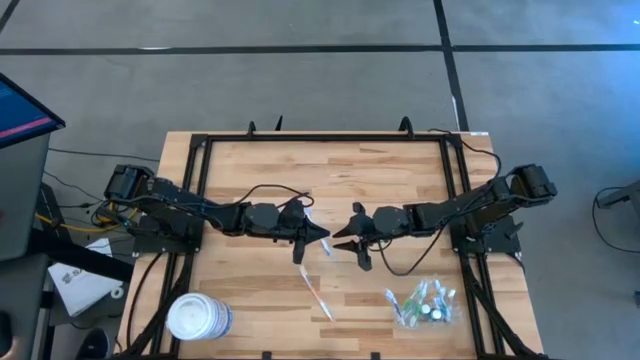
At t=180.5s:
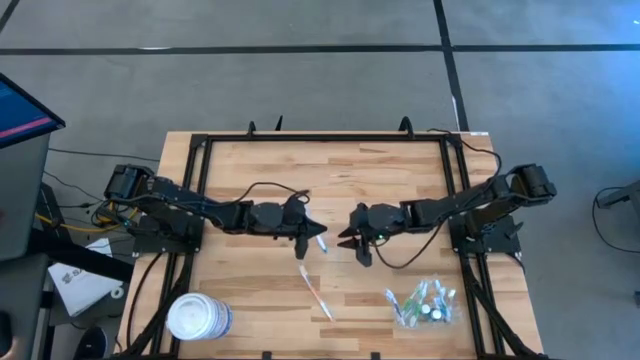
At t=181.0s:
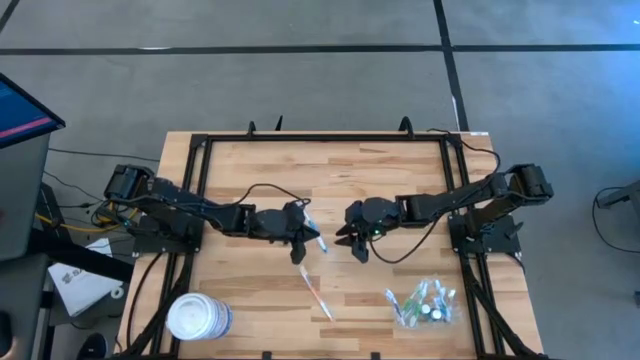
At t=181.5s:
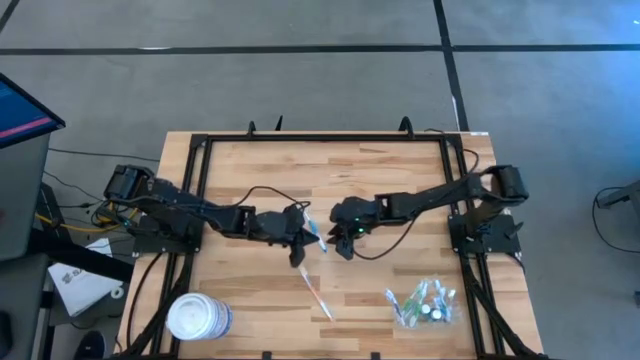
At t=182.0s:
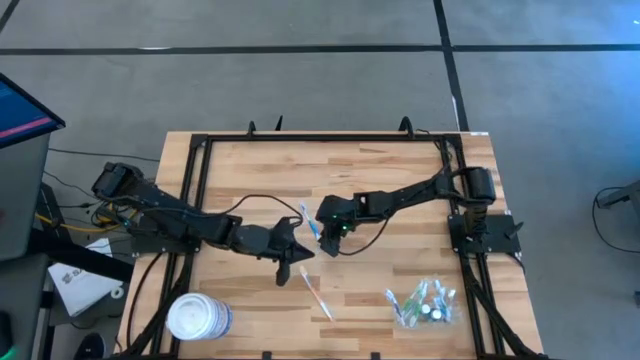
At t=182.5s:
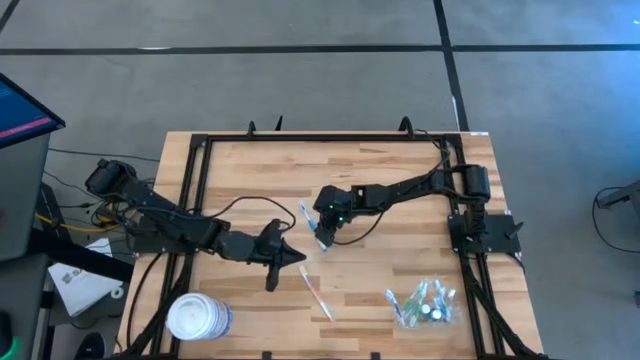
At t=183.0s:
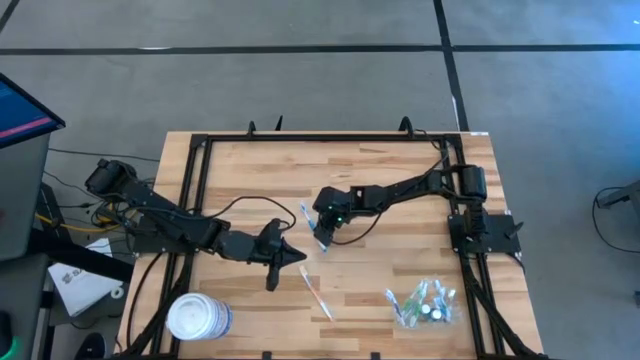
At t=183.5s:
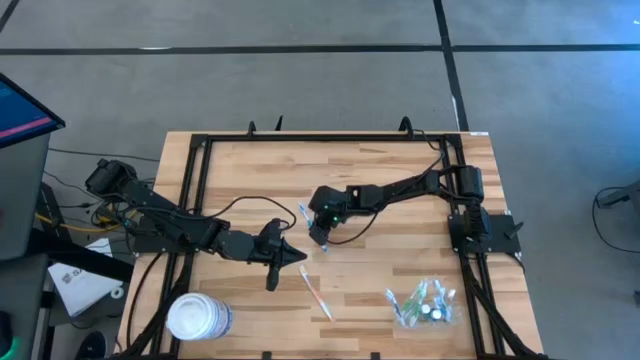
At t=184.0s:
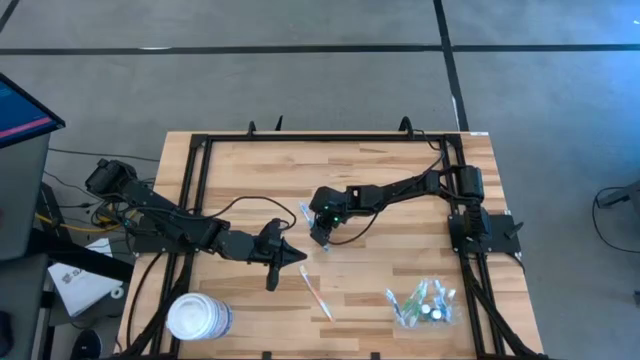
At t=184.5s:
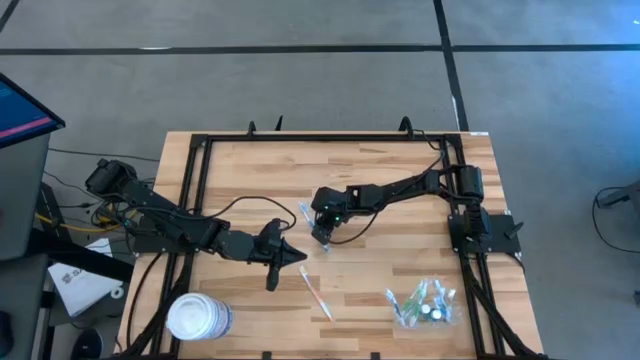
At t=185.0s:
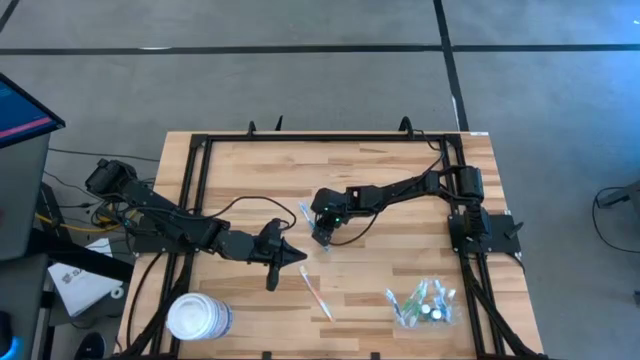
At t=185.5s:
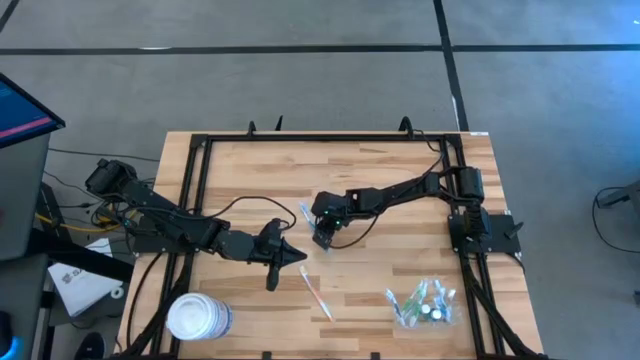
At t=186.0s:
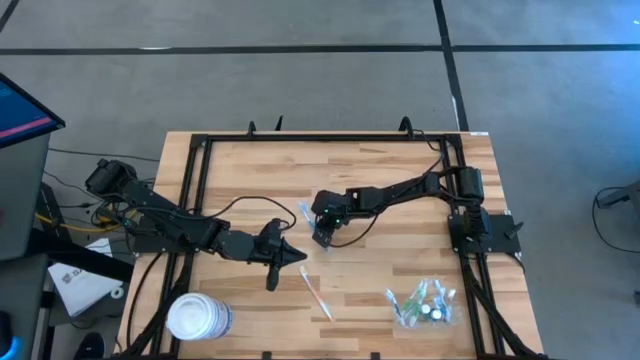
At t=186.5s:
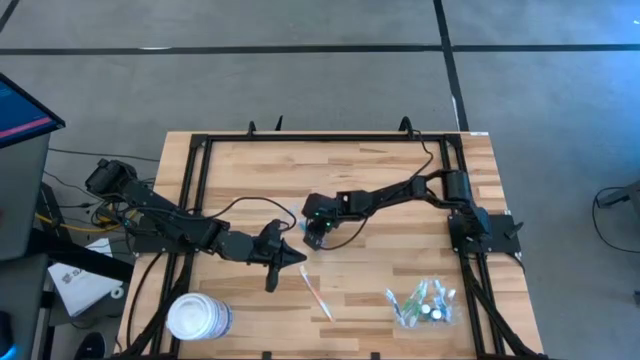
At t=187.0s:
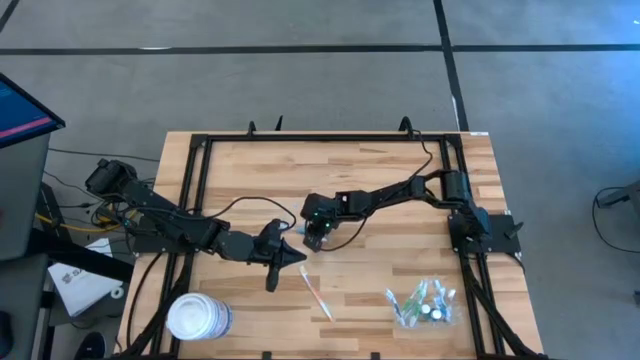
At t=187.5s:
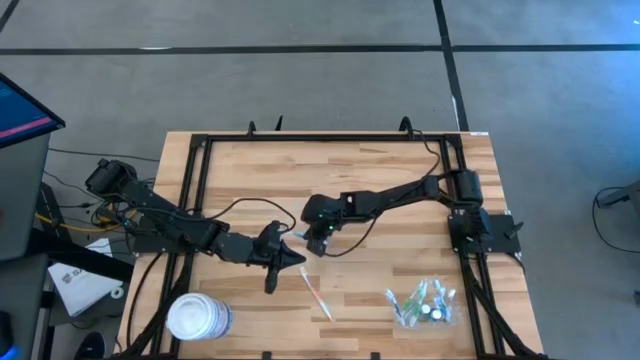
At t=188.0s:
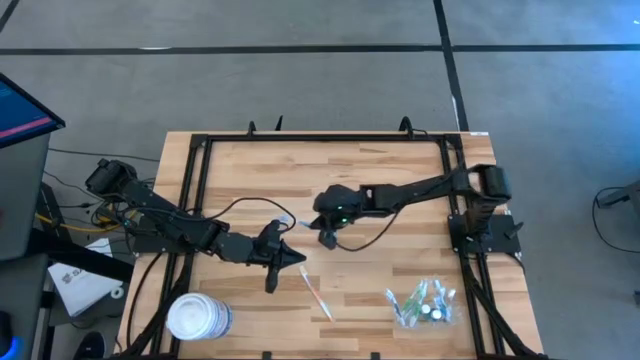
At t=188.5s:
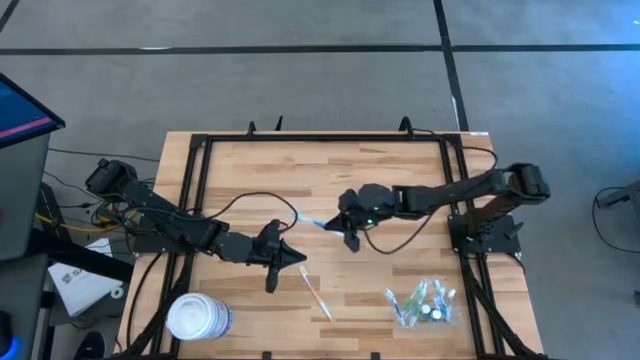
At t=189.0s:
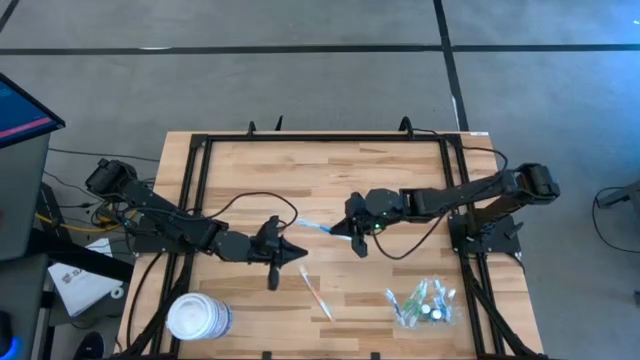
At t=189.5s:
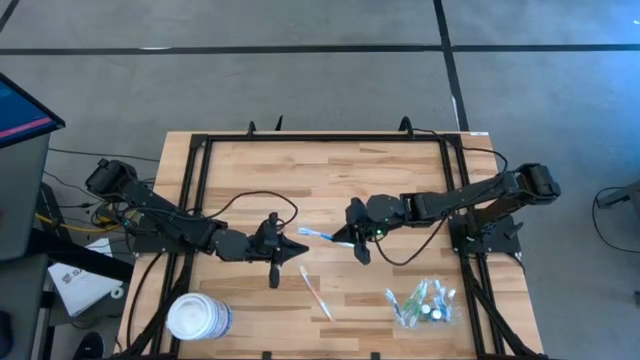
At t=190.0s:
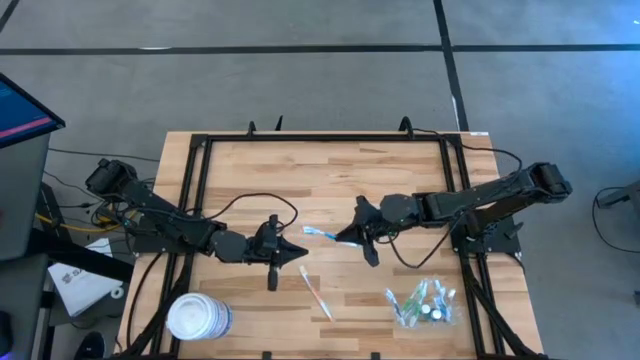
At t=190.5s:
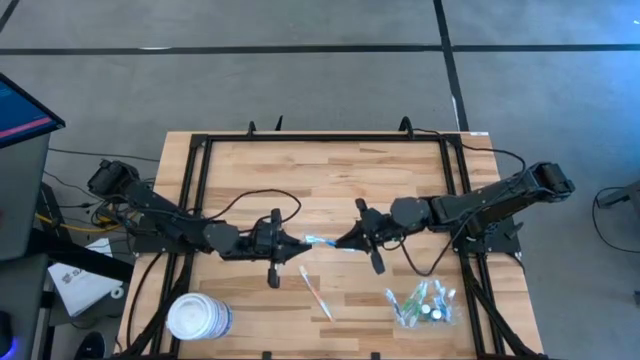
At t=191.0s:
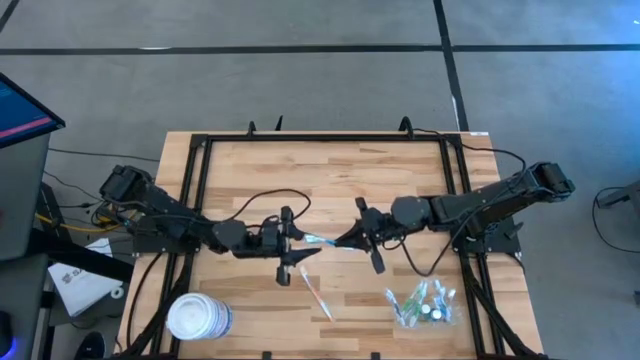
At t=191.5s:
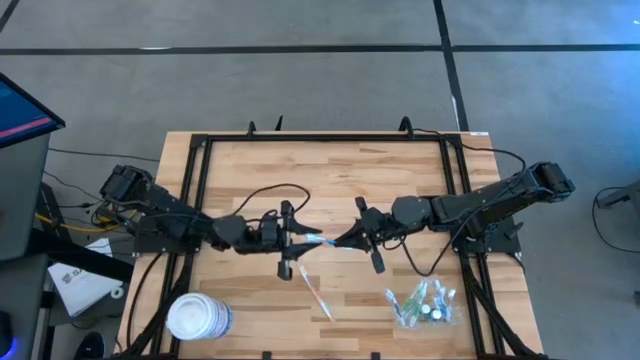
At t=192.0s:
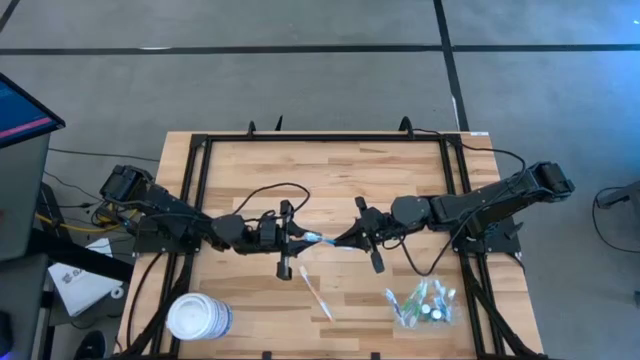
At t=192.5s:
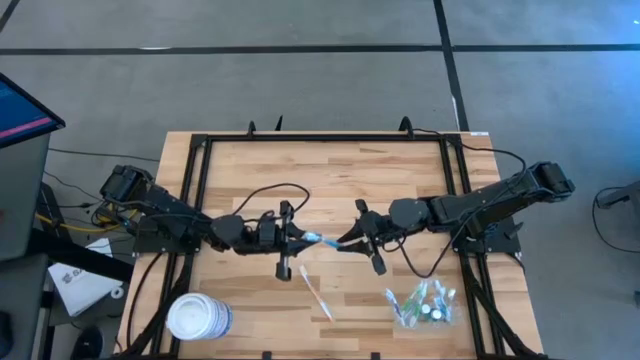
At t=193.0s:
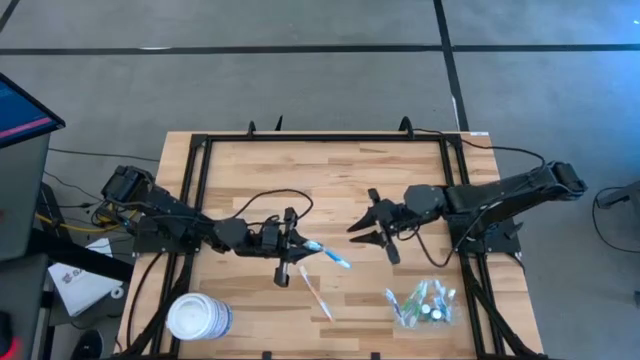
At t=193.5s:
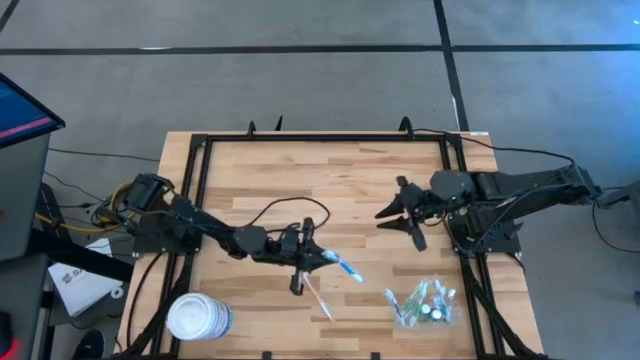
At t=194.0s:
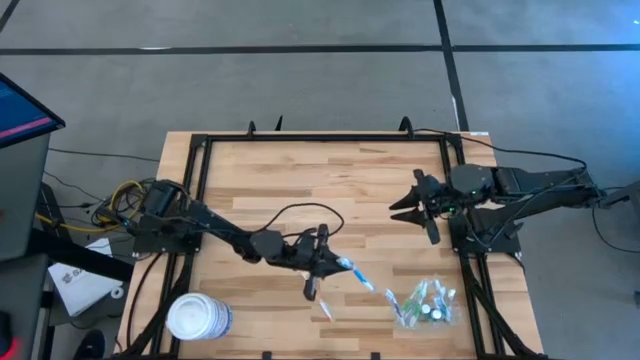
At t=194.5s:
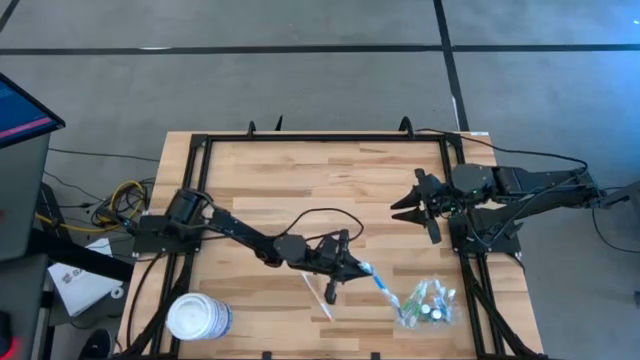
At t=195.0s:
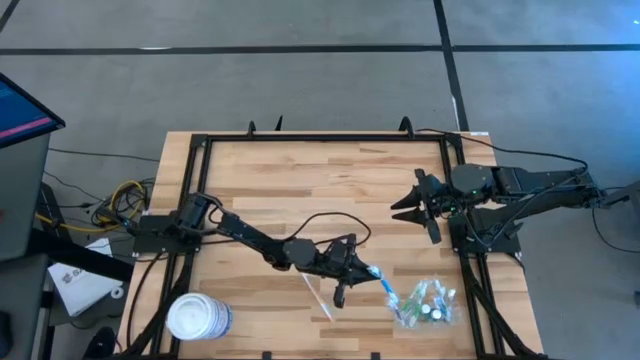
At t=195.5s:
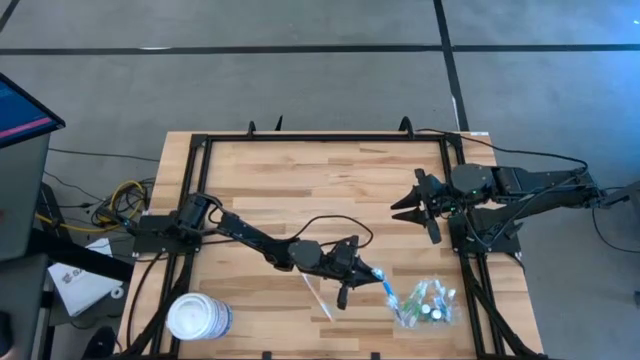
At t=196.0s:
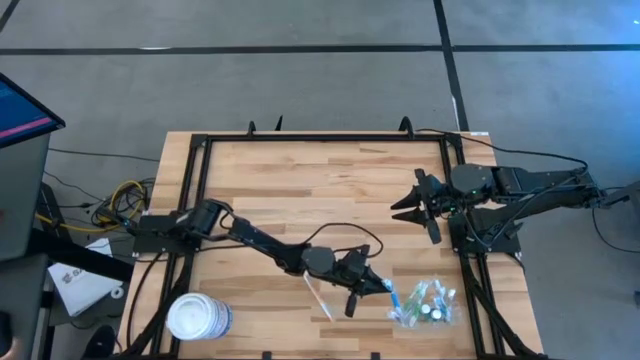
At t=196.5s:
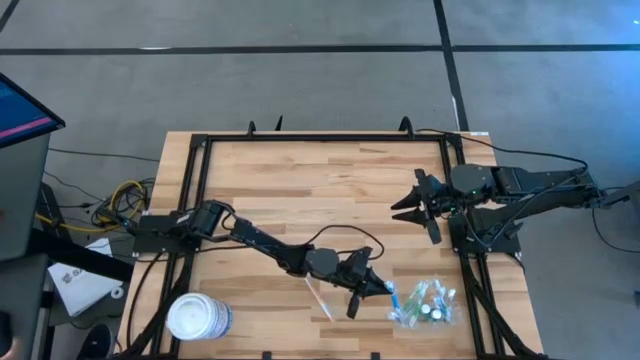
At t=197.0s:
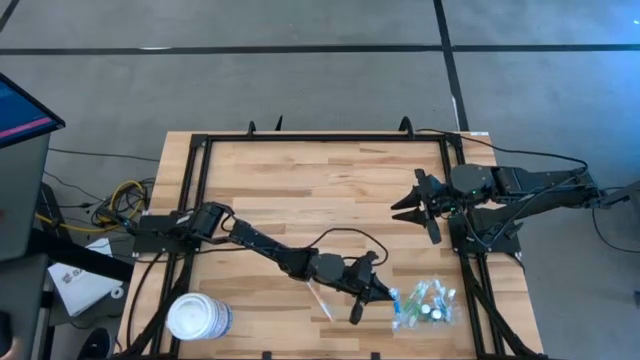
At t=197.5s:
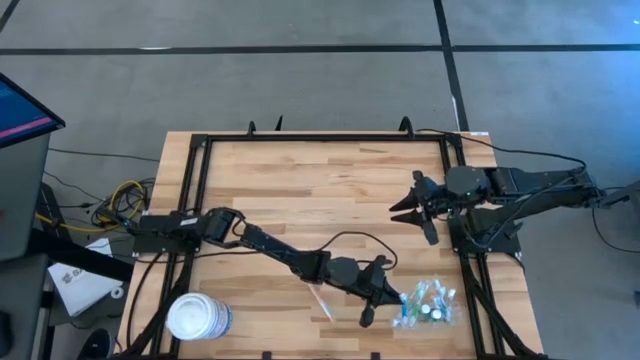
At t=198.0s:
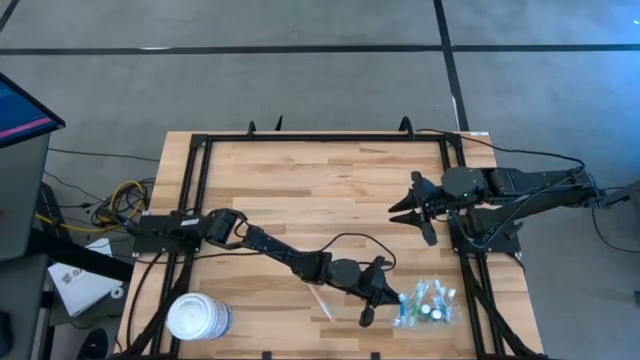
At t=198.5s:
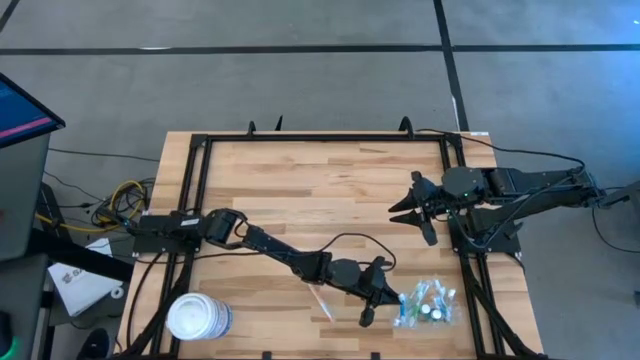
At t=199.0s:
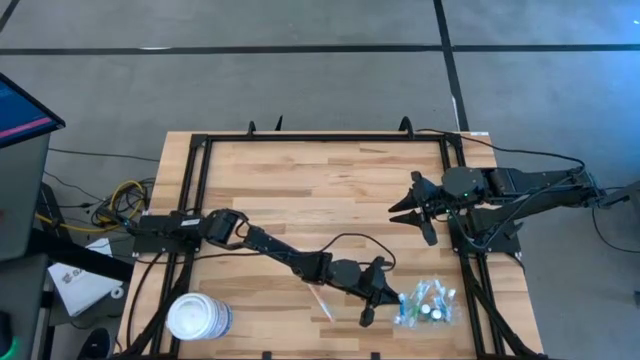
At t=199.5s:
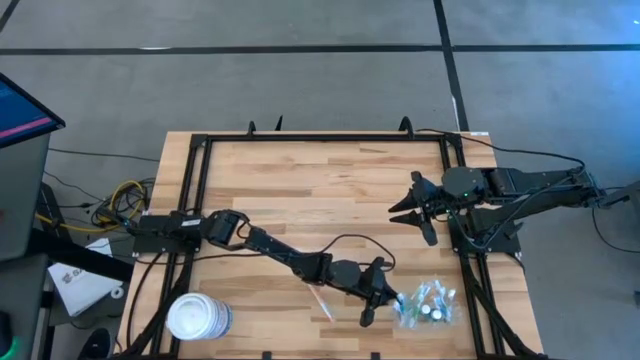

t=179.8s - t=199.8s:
Task: Pick & Place toothbrushing station
Put the blue toothbrush into the transparent organizer

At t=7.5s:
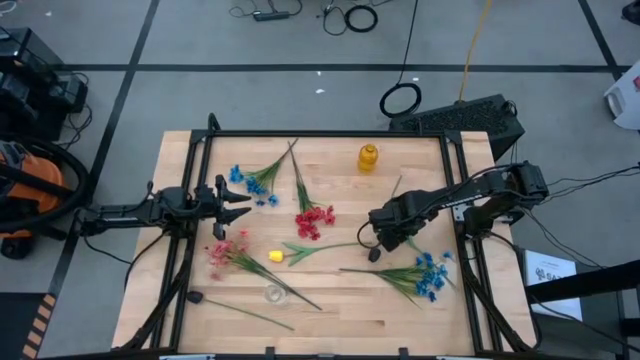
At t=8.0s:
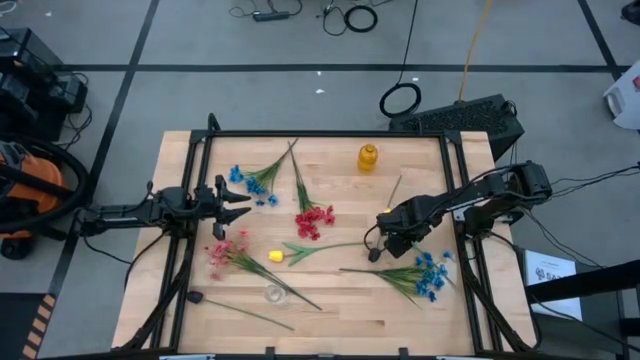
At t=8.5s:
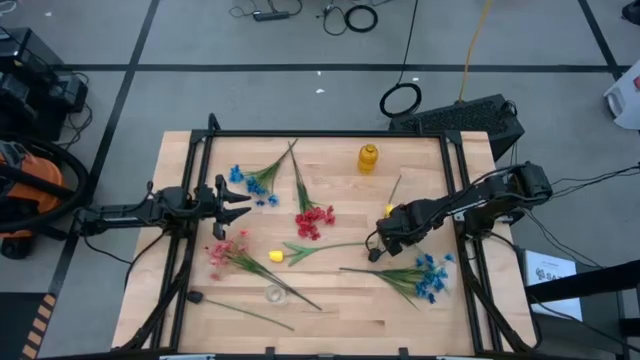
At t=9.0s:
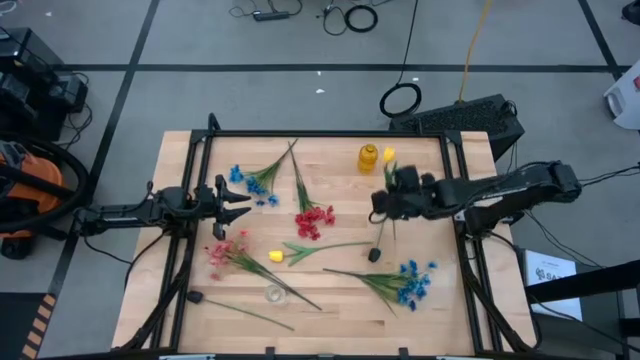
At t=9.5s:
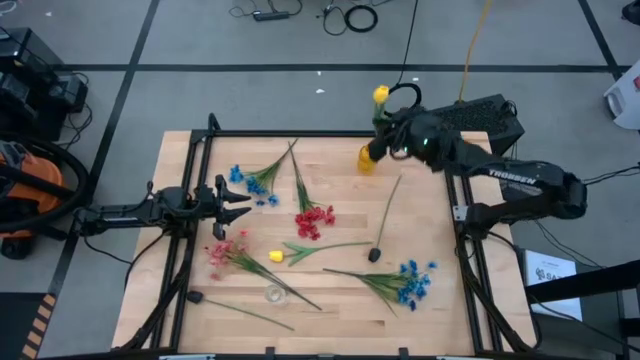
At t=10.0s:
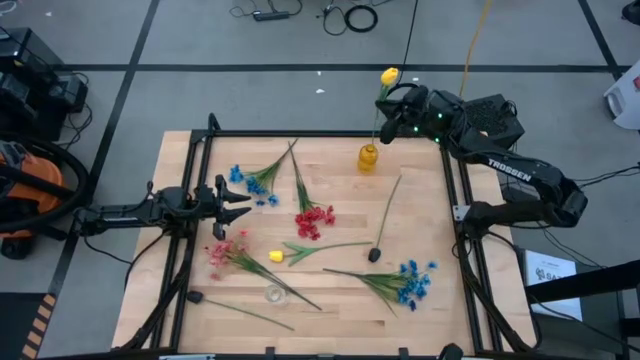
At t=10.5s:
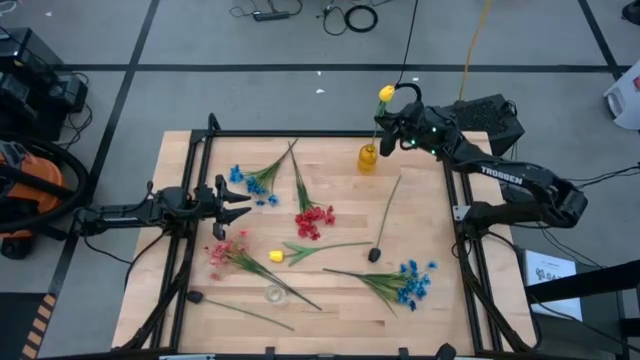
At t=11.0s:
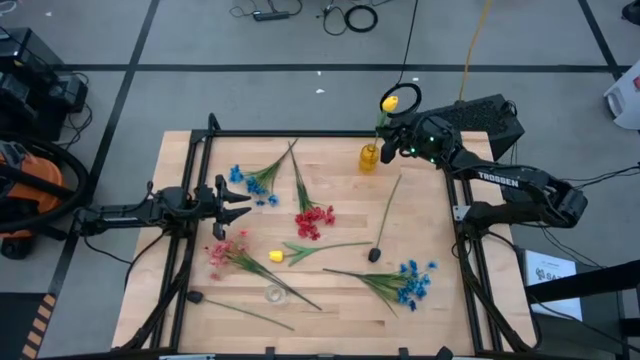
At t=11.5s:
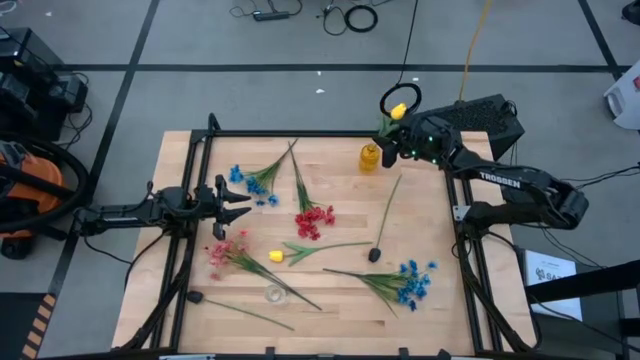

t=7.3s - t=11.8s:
Task: Sort flowers into vase by color
Put the right yellow flower into the yellow vase
